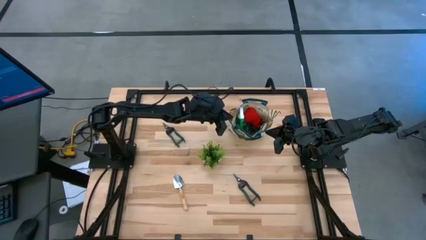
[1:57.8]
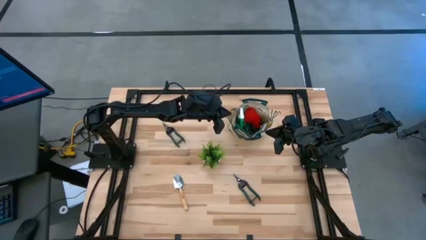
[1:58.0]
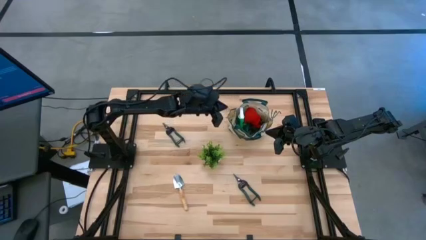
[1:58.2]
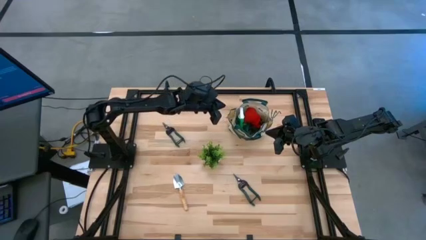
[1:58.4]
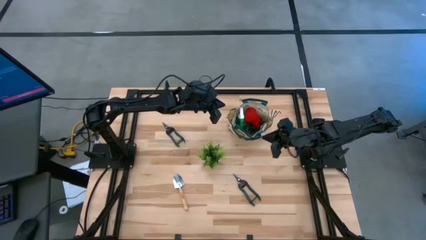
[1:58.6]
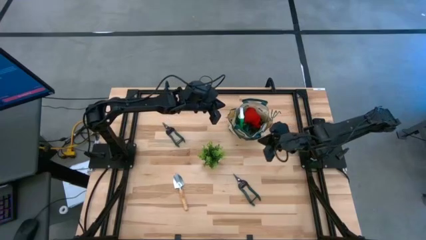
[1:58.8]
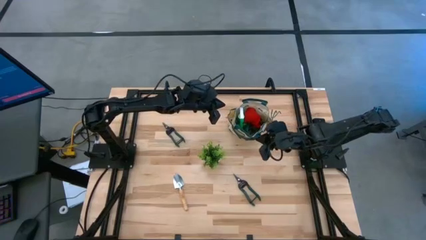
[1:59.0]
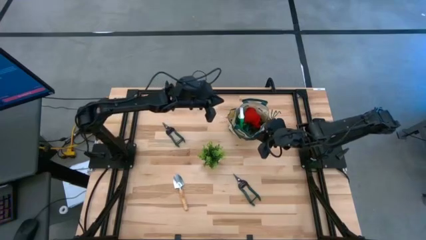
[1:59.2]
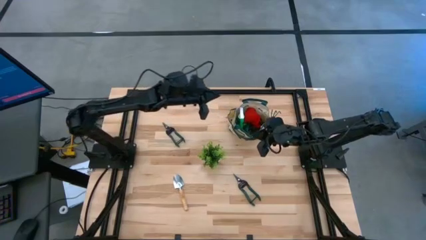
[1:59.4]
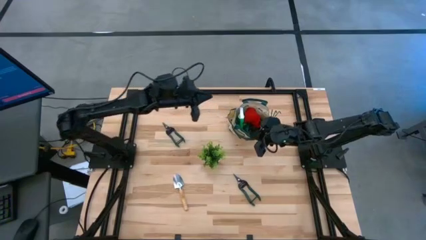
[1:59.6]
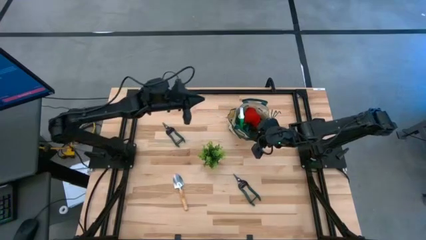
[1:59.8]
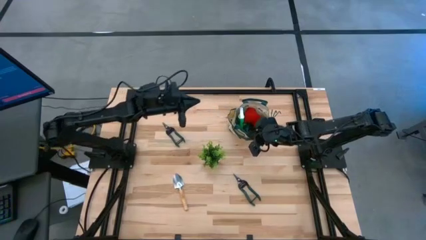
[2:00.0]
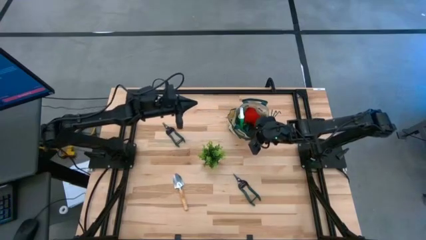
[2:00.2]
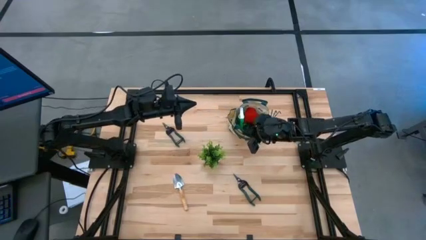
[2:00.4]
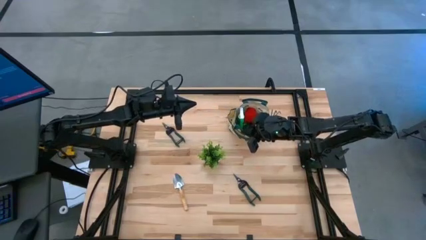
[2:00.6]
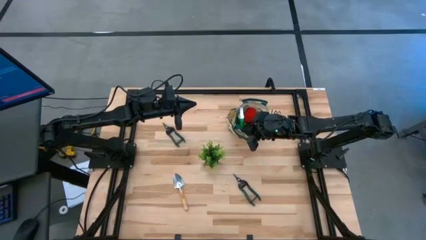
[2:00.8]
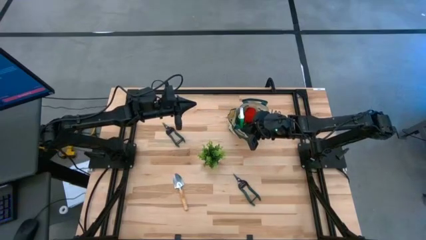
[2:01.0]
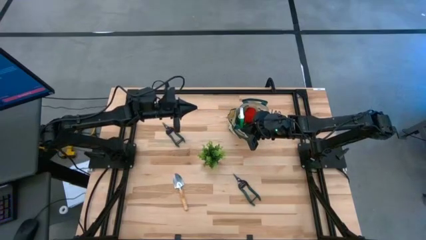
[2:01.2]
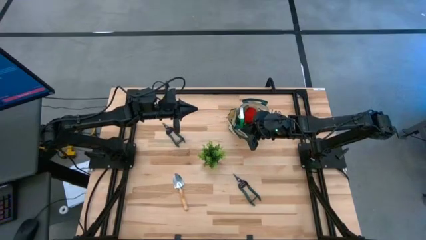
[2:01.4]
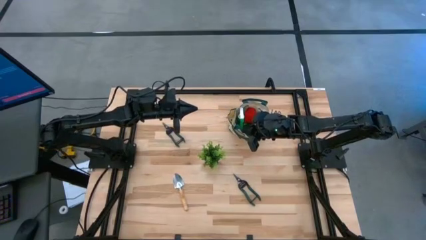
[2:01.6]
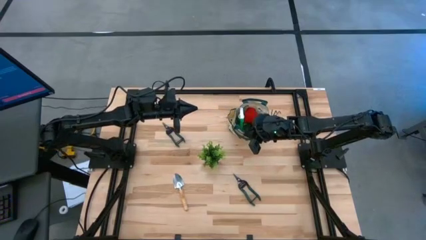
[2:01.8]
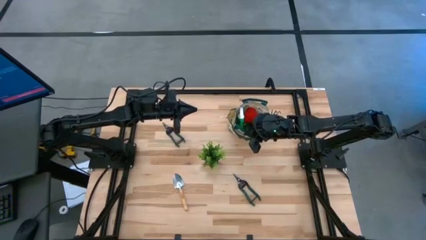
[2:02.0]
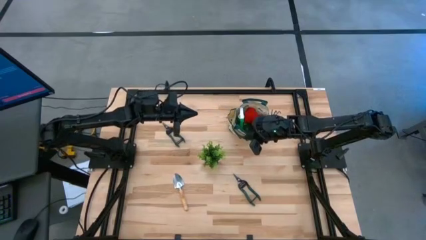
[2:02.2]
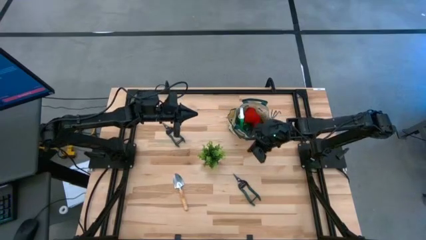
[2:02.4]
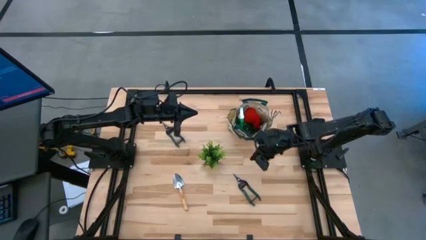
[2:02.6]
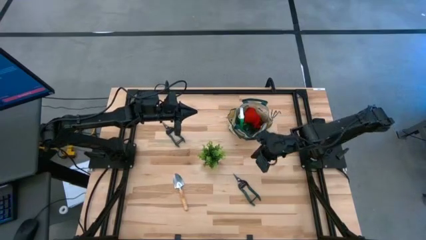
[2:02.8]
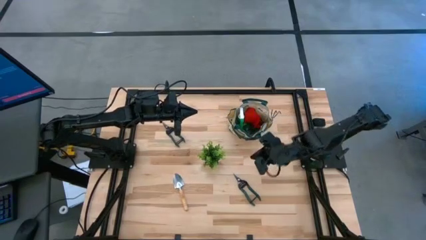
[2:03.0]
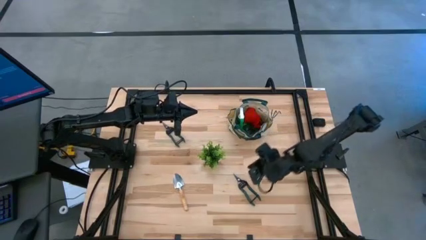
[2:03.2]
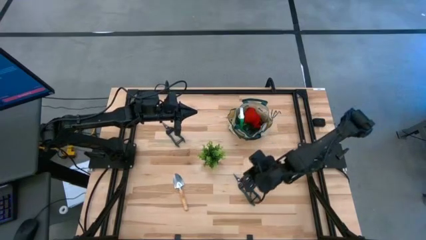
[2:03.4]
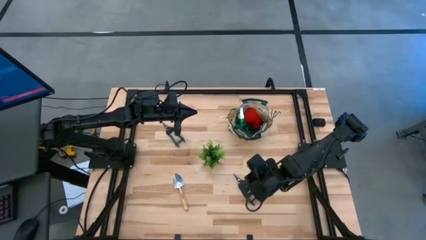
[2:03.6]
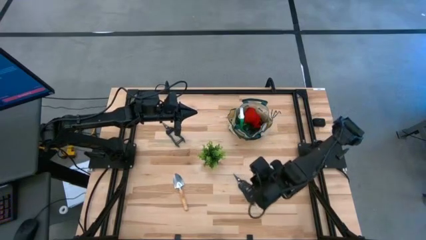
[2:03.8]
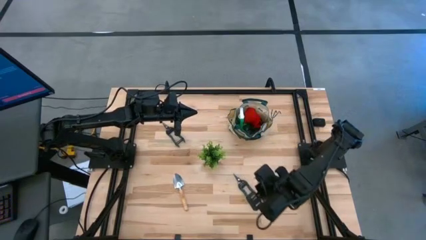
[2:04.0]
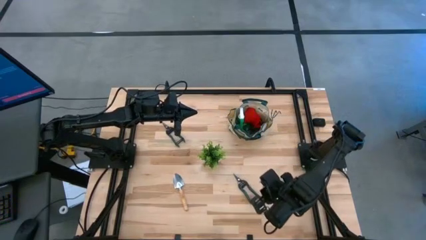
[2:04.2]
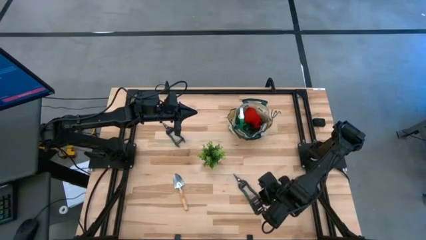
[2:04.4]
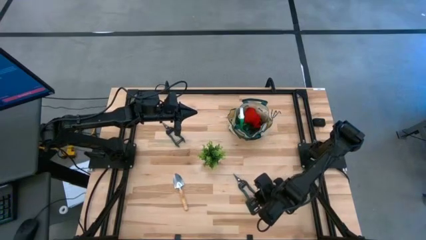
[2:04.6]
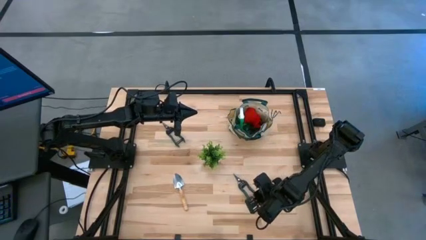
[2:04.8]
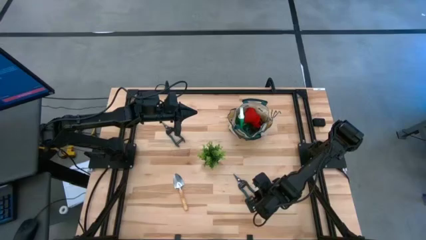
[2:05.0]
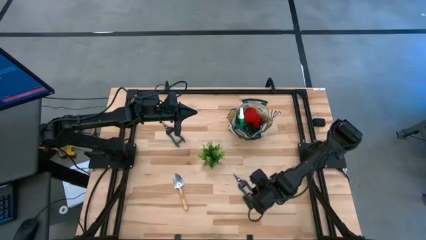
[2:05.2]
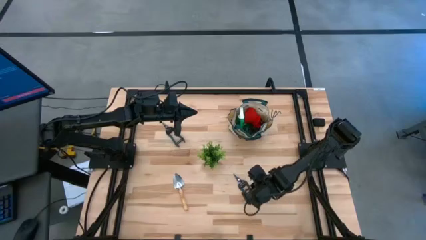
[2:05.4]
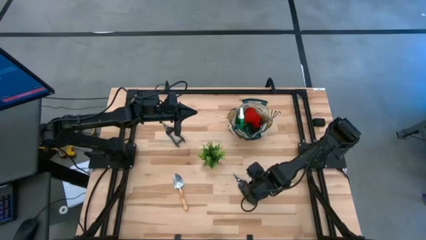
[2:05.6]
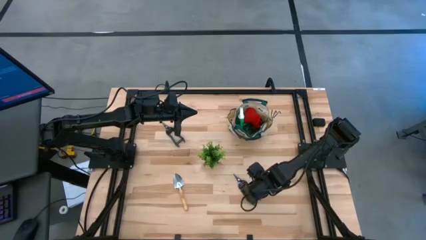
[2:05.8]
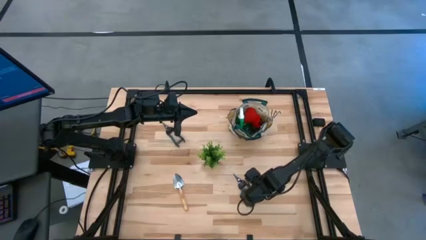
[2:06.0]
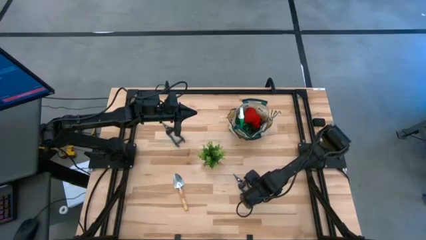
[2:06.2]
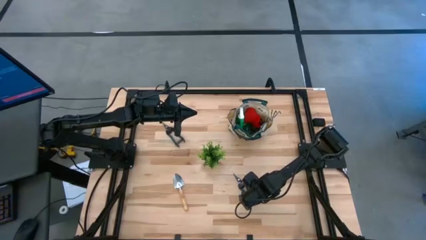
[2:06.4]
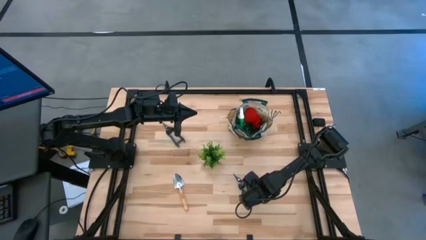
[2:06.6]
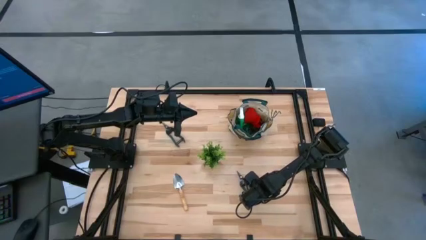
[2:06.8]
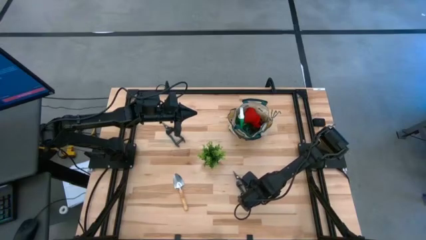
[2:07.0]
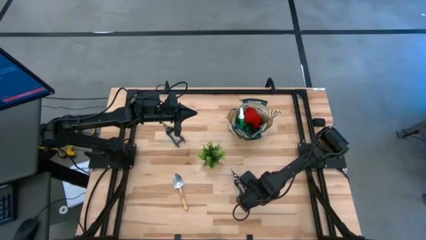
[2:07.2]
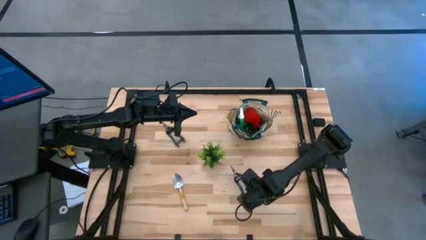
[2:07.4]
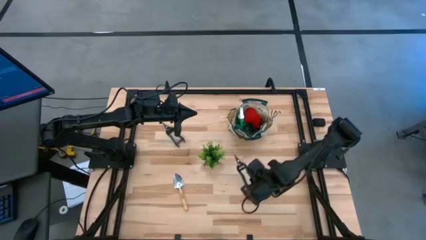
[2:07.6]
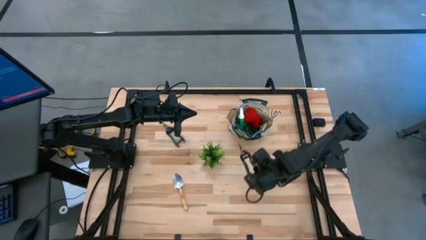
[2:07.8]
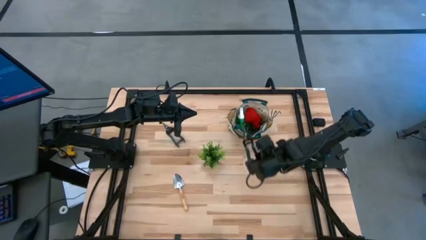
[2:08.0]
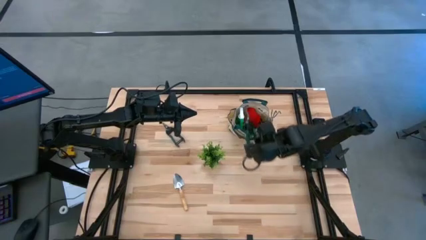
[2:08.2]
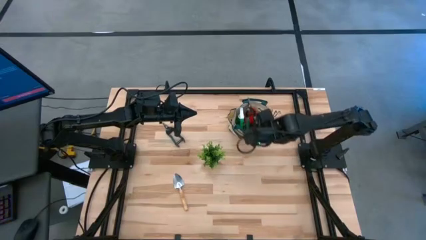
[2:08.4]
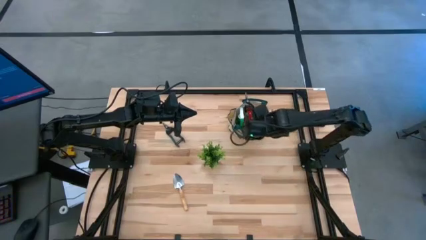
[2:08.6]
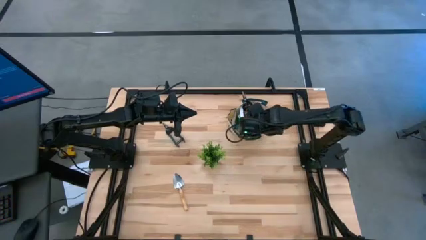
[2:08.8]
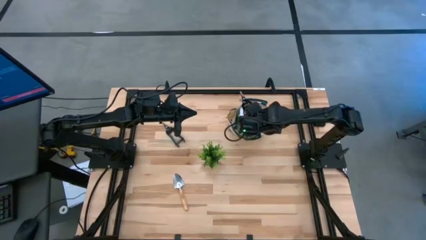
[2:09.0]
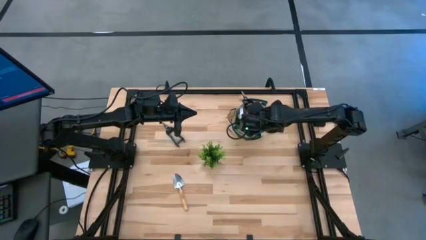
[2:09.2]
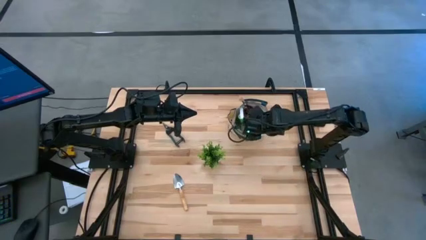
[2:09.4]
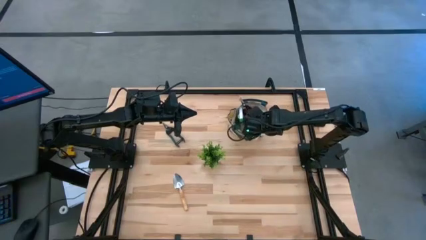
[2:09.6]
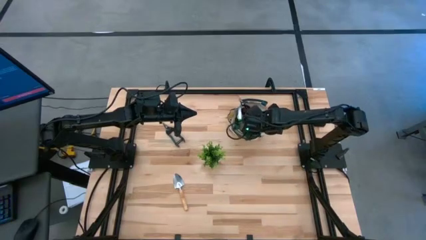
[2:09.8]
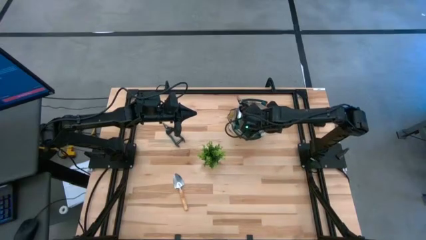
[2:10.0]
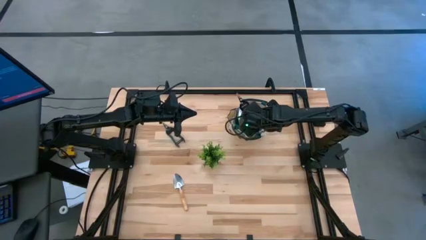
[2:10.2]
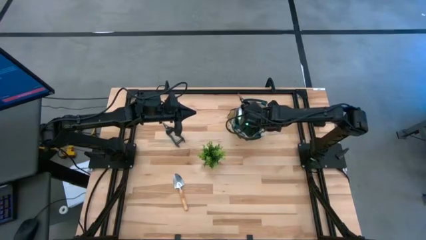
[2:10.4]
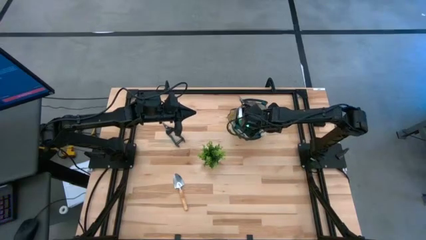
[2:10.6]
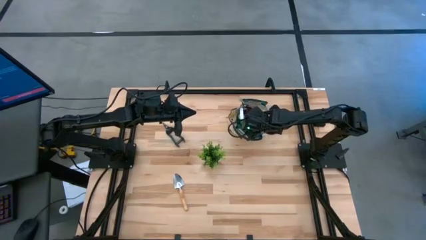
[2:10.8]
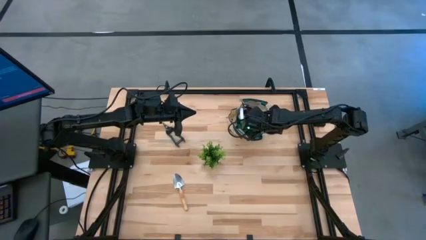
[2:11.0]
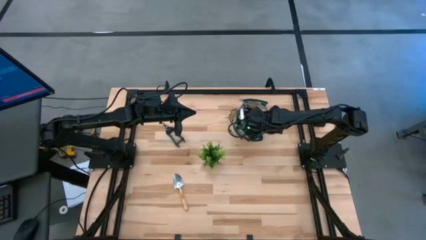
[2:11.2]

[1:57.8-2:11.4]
Task: Pick & Place Garden tools in Gardening bag
Put the bottom green fruit pruner into the brown gardening bag
